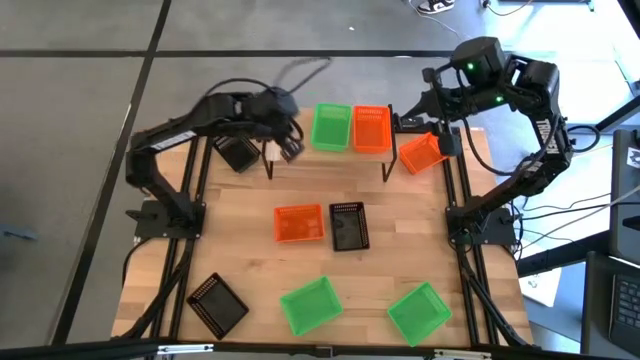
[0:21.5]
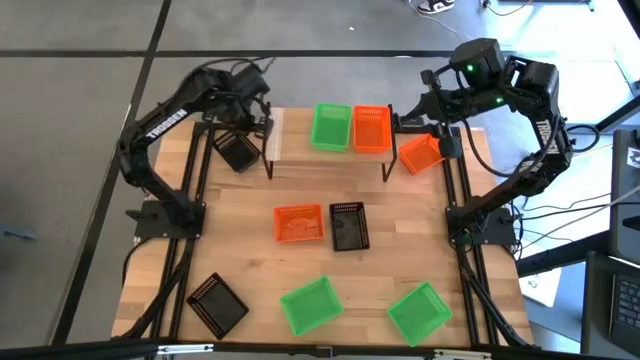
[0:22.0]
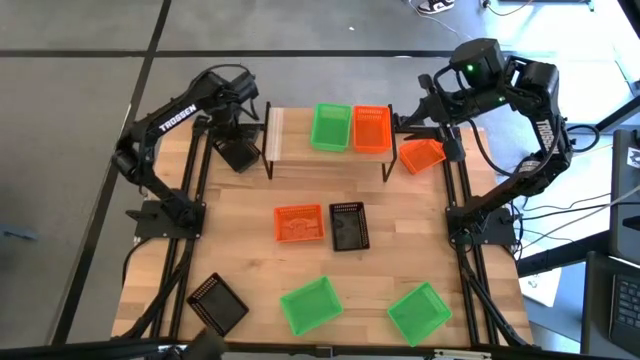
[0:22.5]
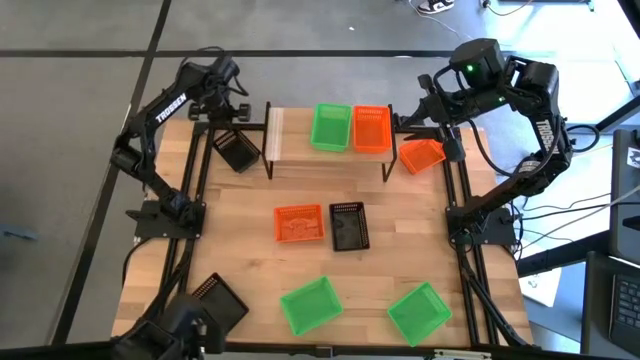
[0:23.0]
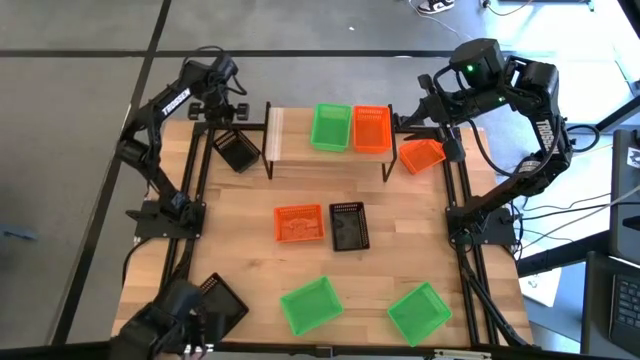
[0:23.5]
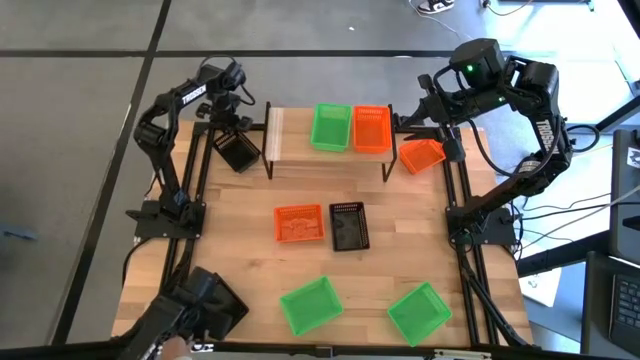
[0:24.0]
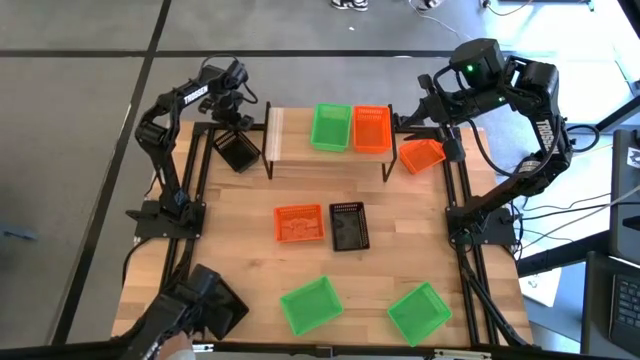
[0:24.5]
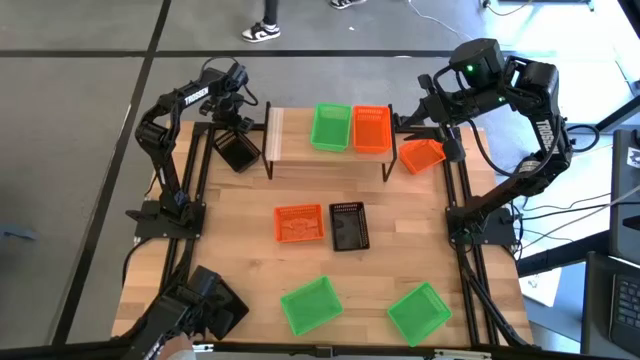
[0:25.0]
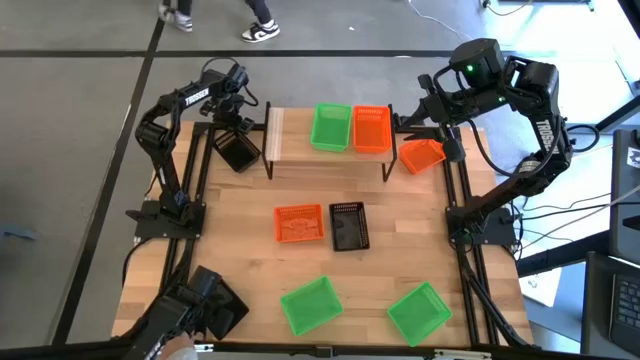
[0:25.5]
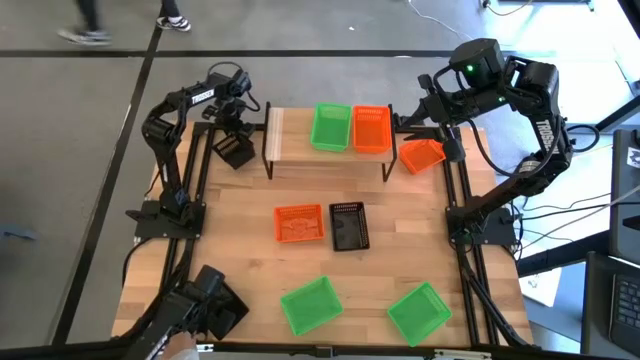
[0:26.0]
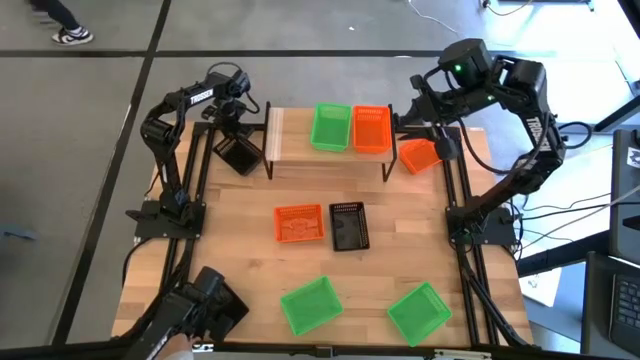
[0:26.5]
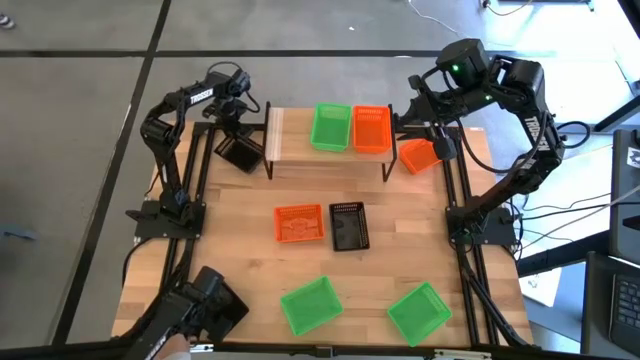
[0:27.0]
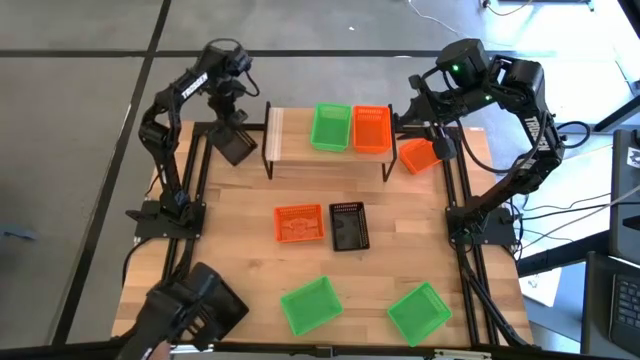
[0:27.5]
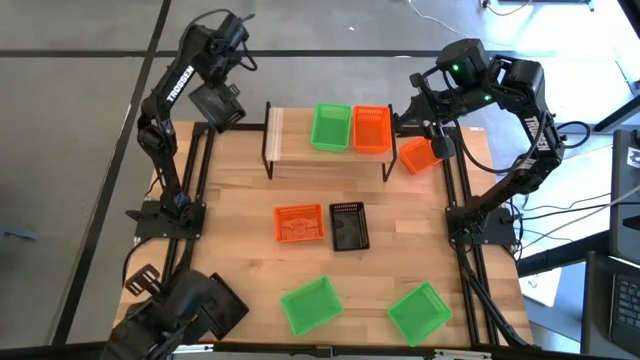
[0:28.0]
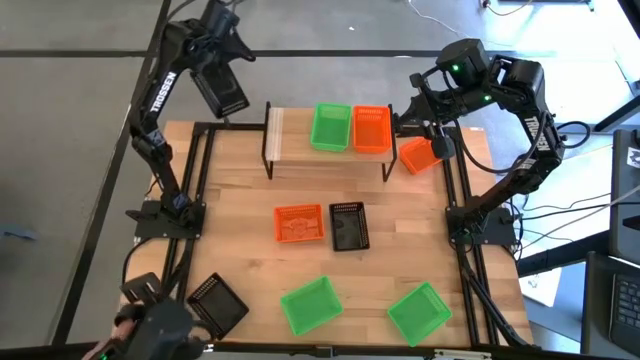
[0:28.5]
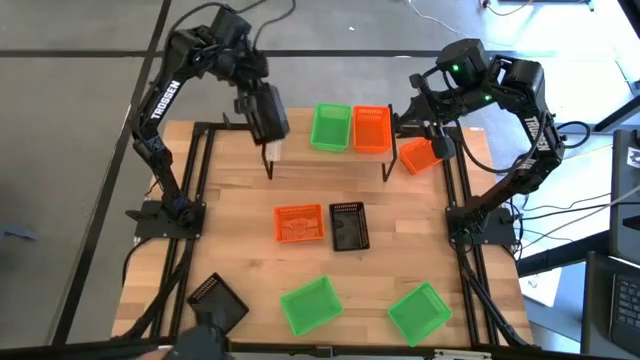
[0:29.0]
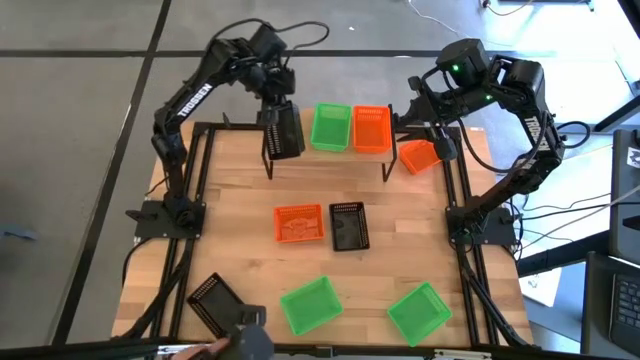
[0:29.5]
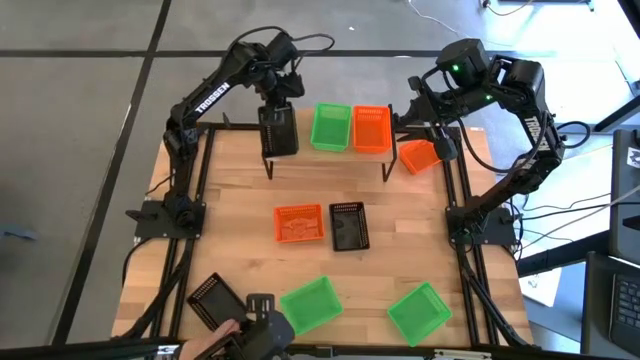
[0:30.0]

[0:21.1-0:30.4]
Task: Stack baskets on shelf by color
Put the top black bin on the shelf

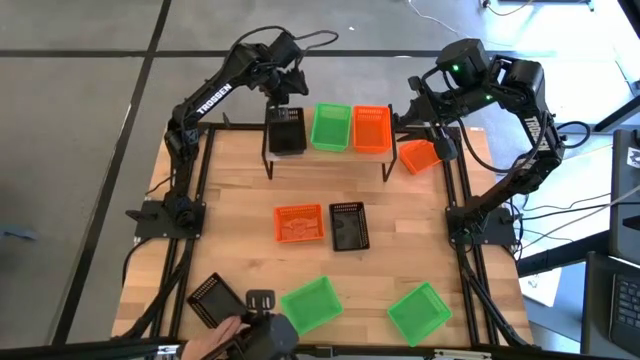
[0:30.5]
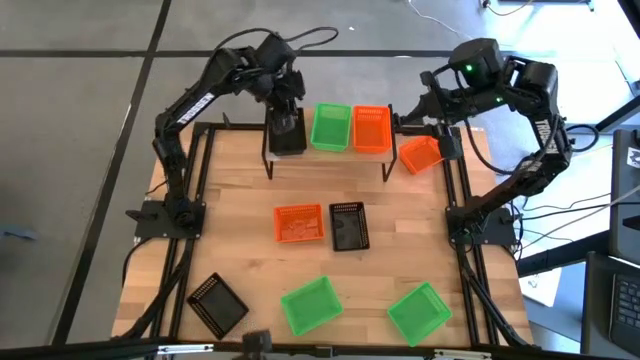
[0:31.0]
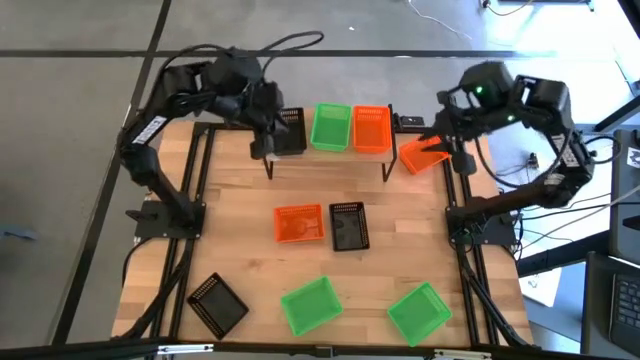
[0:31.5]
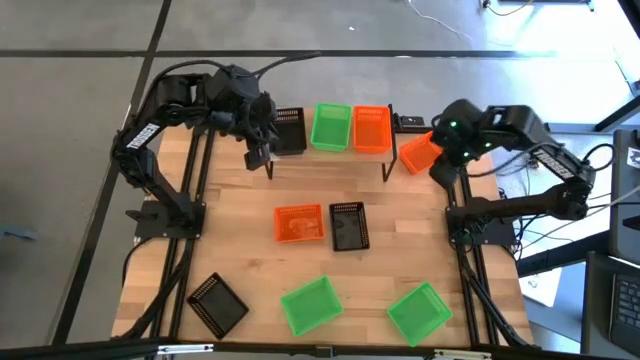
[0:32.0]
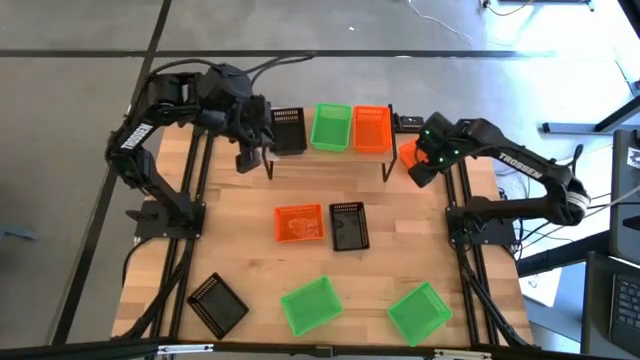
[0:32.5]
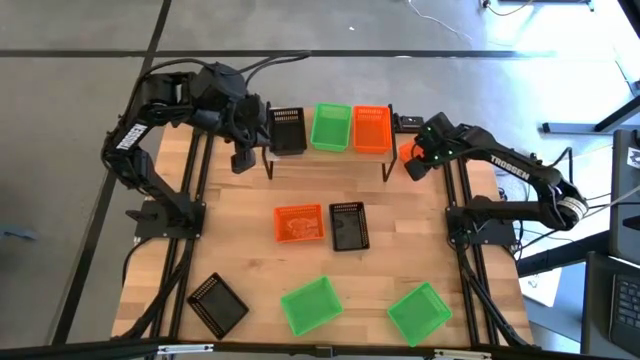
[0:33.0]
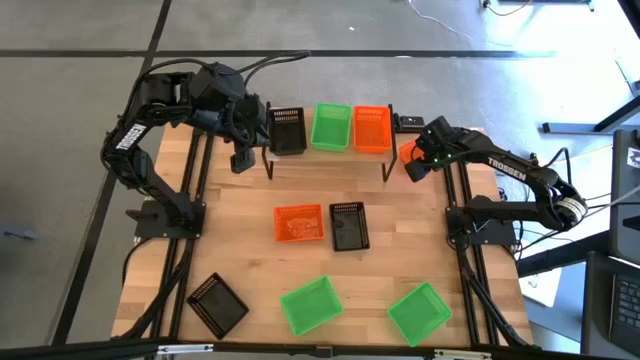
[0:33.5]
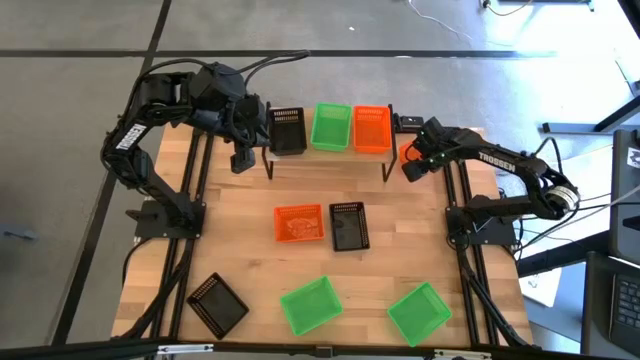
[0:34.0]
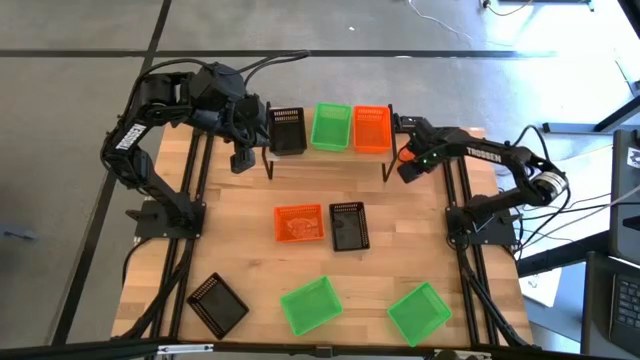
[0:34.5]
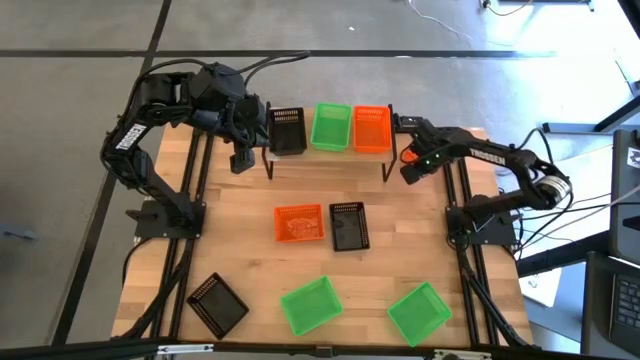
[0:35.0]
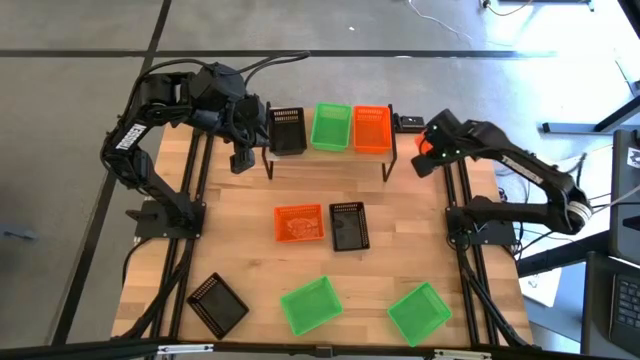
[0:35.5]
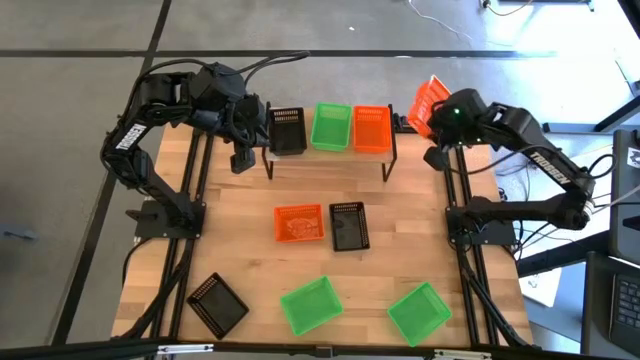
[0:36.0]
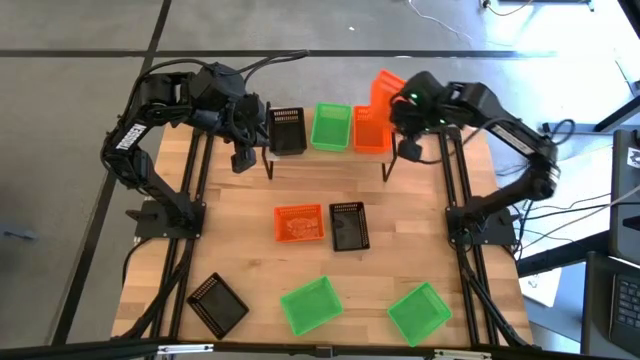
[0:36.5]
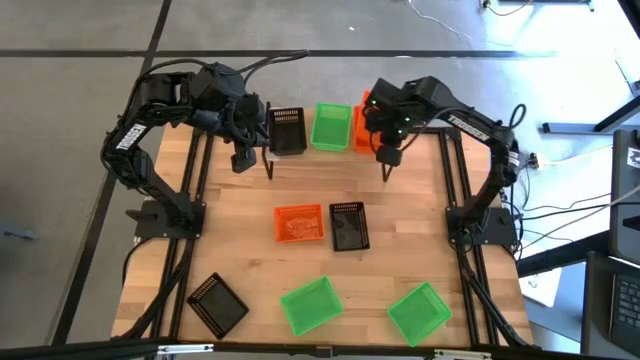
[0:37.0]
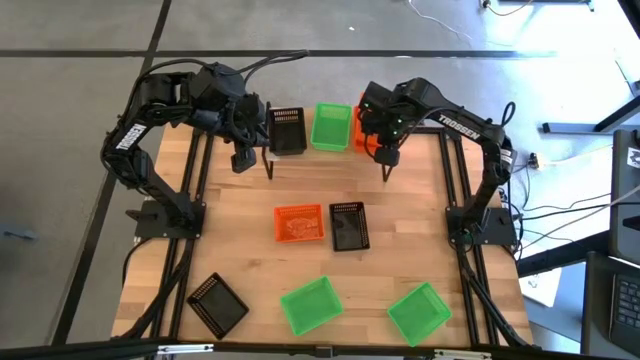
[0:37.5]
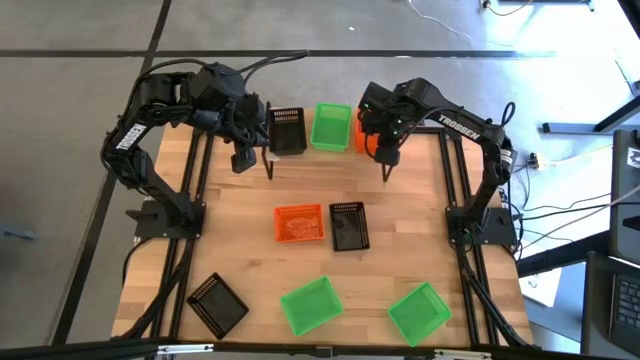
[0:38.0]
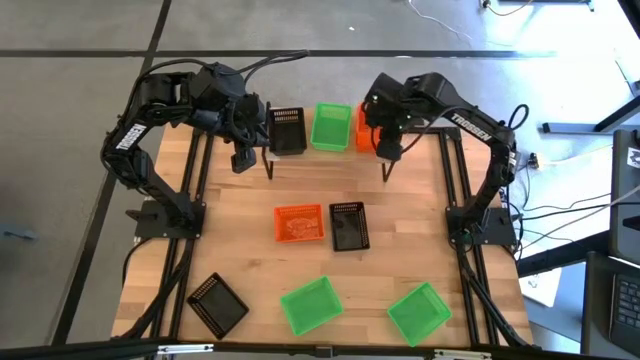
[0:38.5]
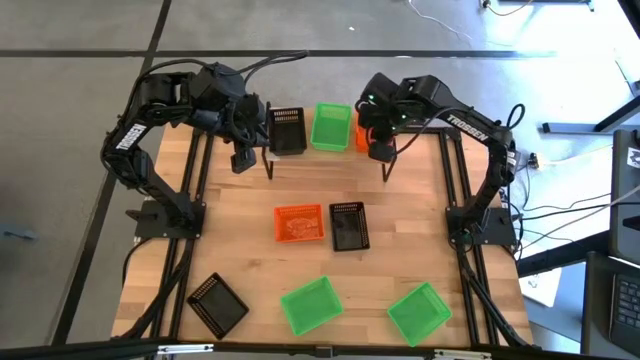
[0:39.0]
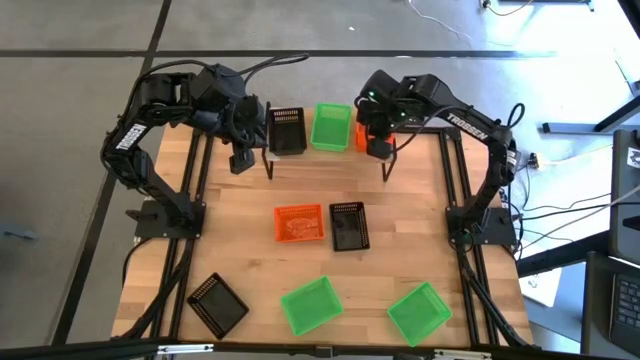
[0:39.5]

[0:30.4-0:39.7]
Stack the top orange bin on top of the other orange bin on the shelf

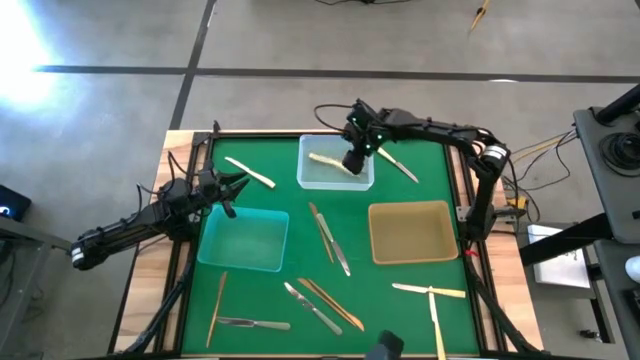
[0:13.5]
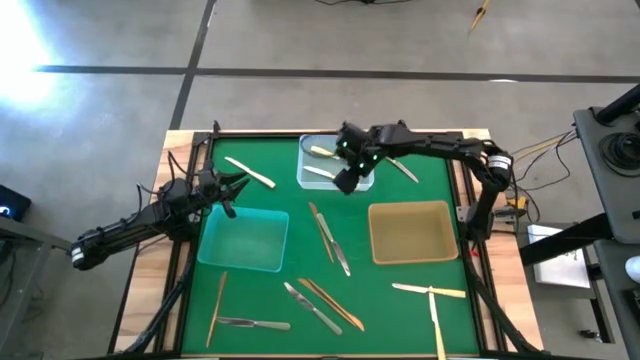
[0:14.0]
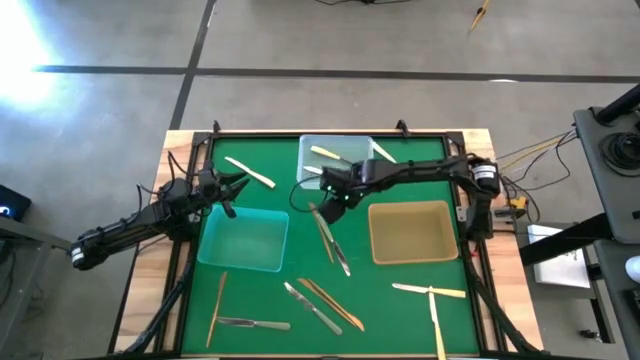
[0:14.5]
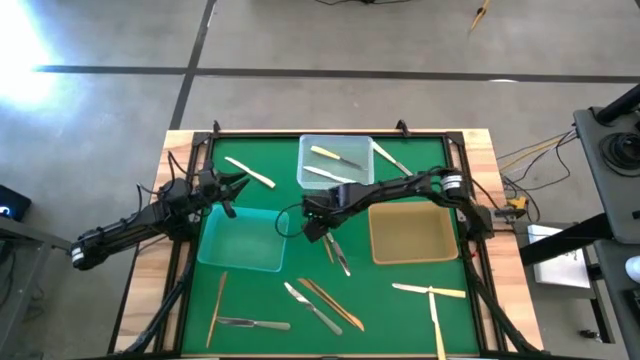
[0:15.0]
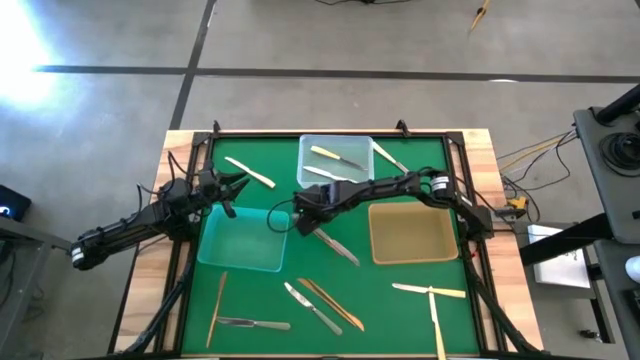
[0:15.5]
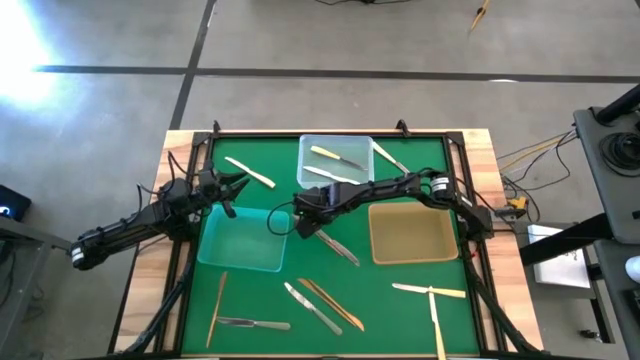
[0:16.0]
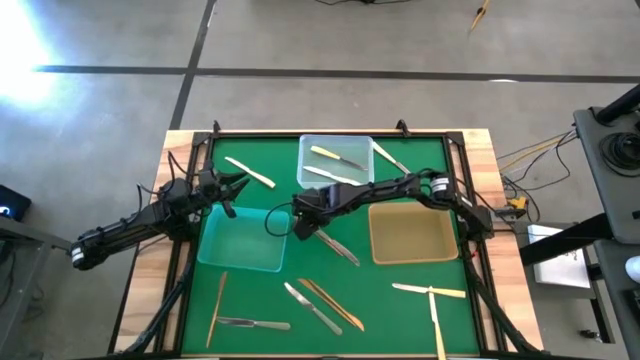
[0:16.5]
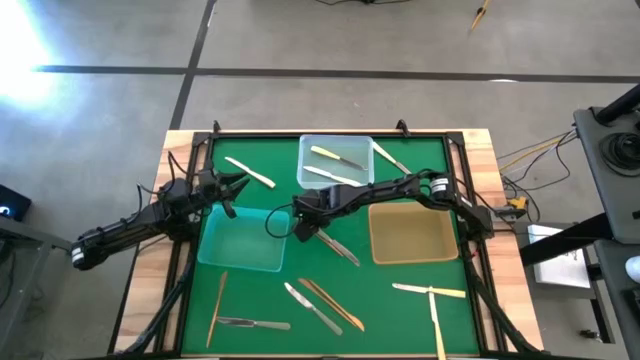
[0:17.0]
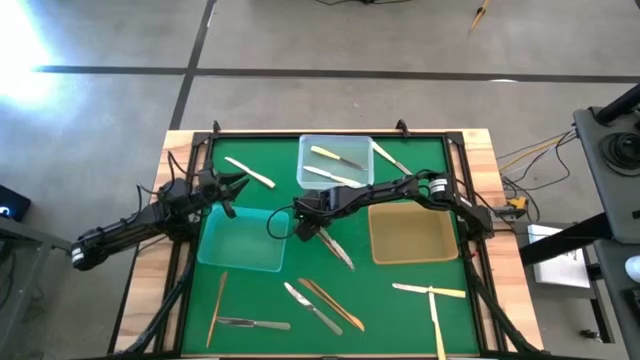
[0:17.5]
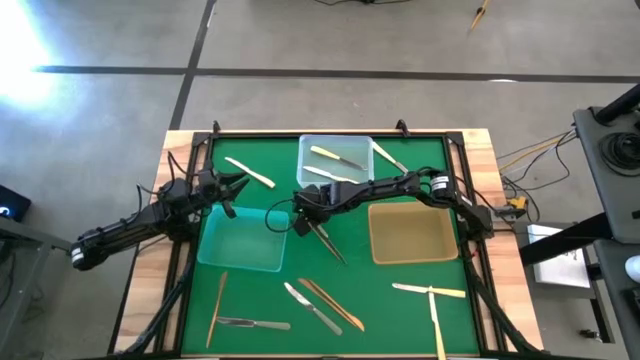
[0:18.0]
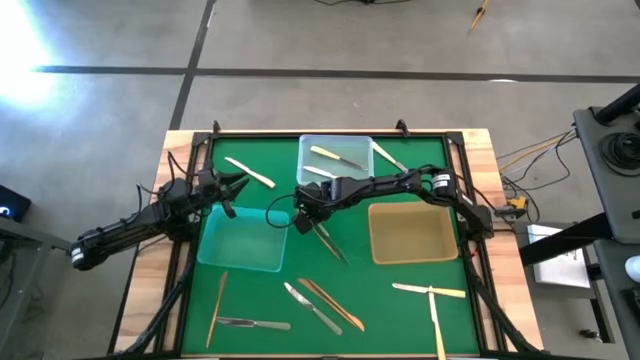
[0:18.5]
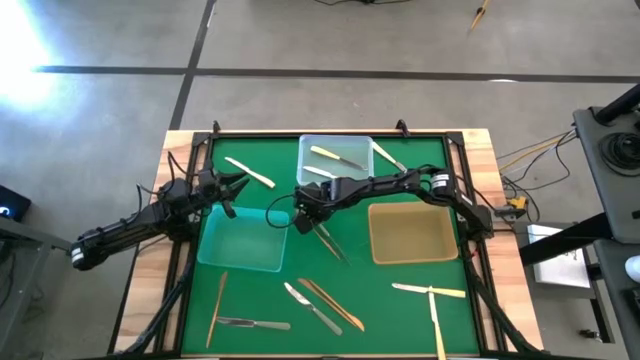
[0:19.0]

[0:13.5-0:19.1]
Task: Sort silverware by color (type)
Put the gray knife into the orange bin
